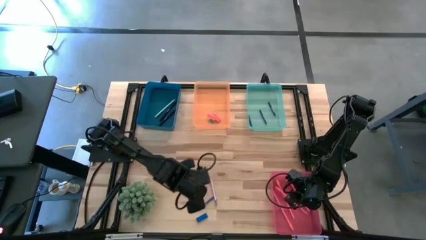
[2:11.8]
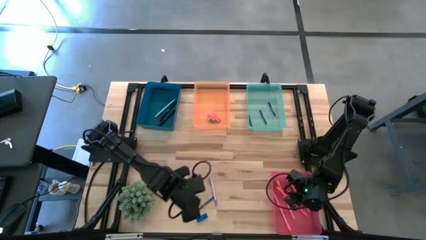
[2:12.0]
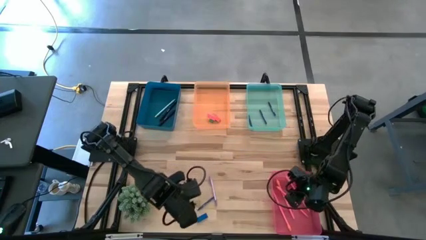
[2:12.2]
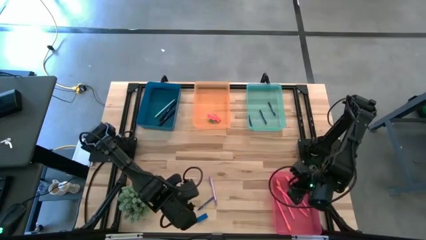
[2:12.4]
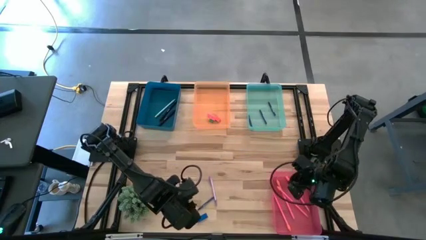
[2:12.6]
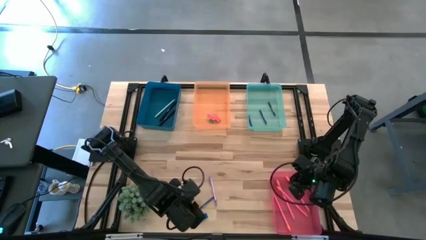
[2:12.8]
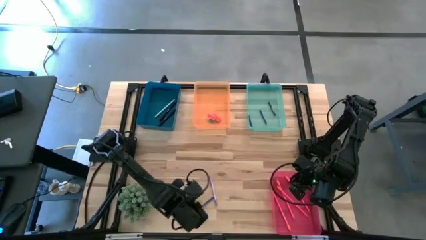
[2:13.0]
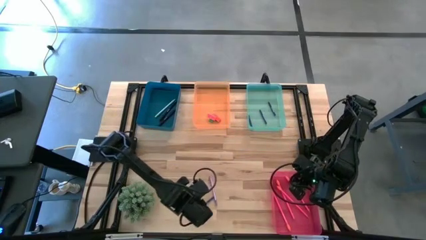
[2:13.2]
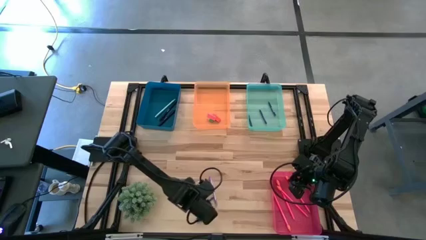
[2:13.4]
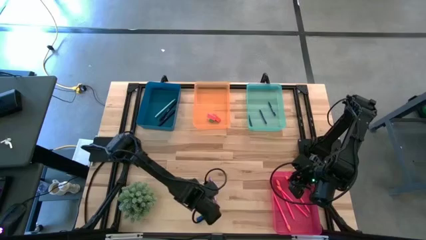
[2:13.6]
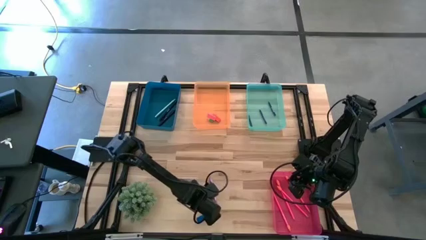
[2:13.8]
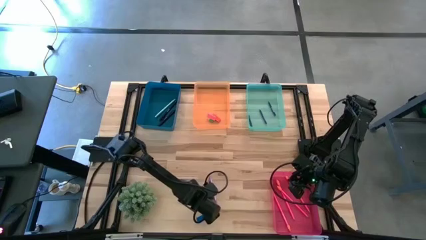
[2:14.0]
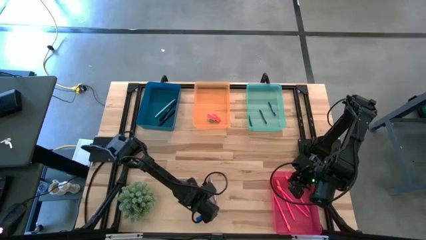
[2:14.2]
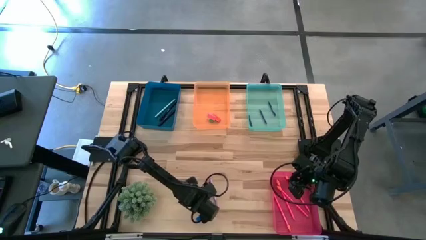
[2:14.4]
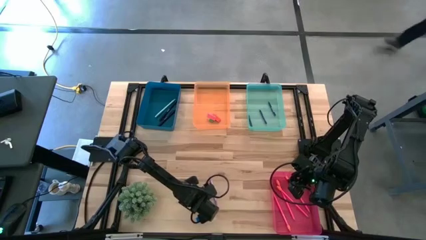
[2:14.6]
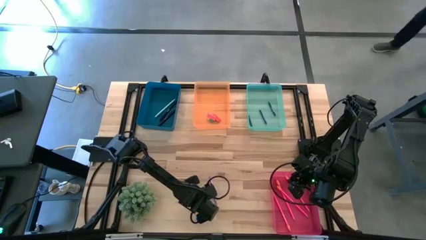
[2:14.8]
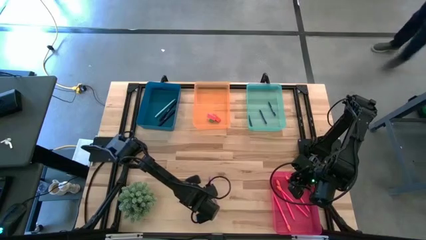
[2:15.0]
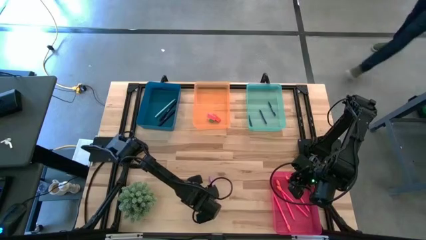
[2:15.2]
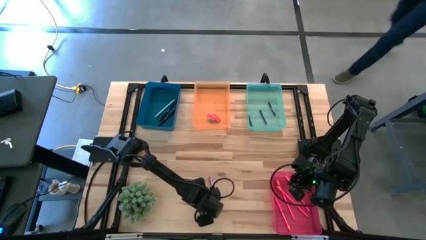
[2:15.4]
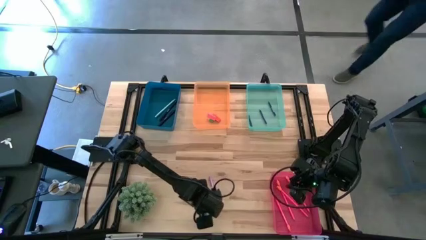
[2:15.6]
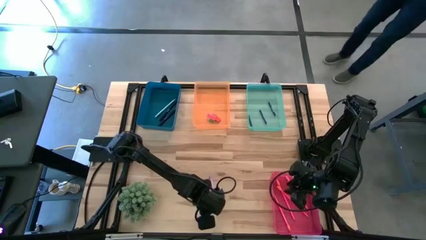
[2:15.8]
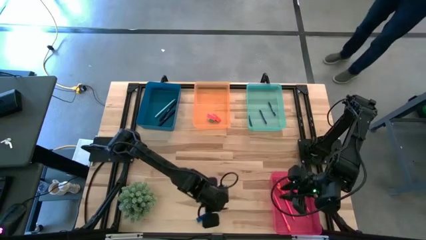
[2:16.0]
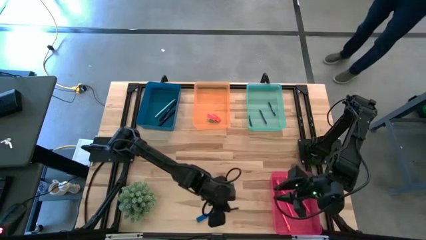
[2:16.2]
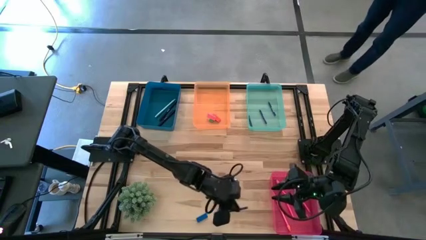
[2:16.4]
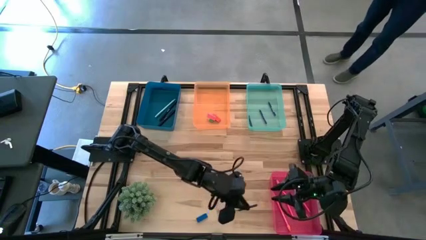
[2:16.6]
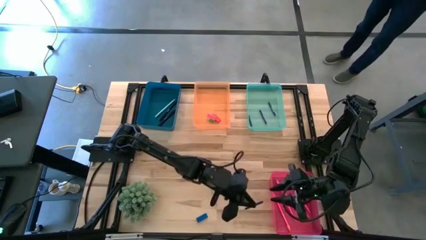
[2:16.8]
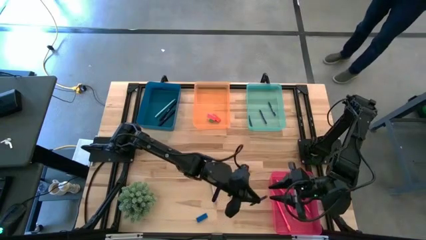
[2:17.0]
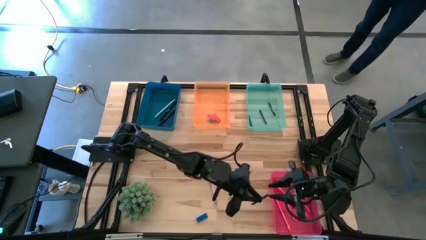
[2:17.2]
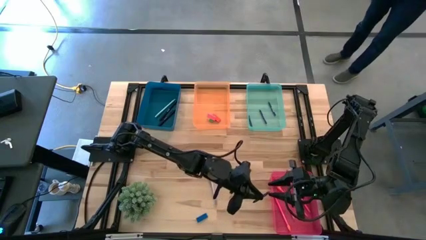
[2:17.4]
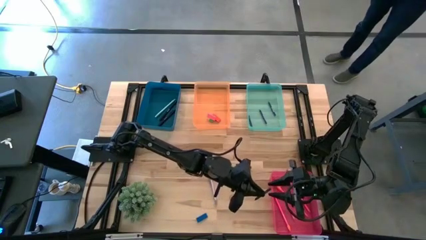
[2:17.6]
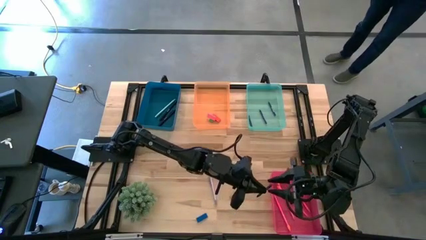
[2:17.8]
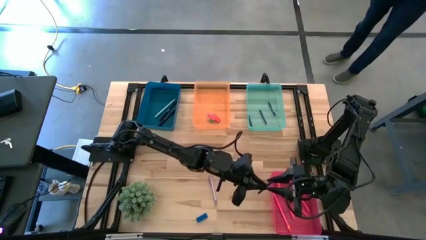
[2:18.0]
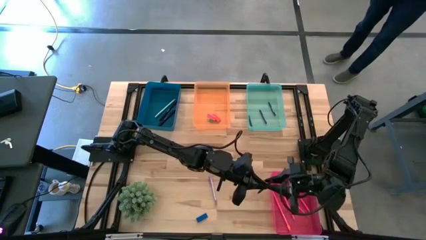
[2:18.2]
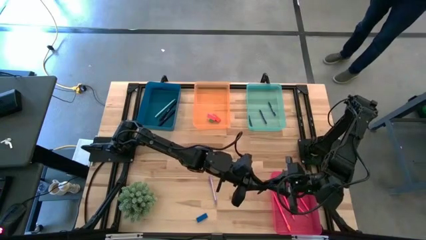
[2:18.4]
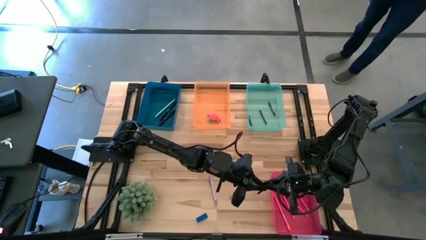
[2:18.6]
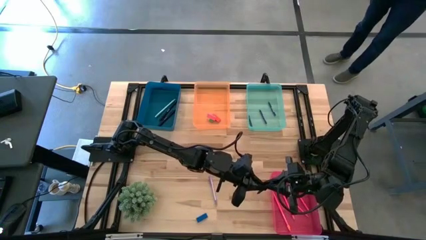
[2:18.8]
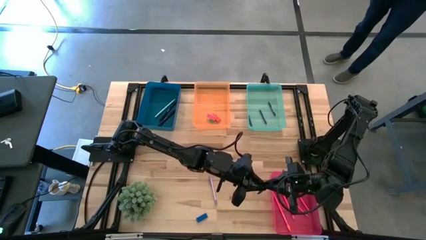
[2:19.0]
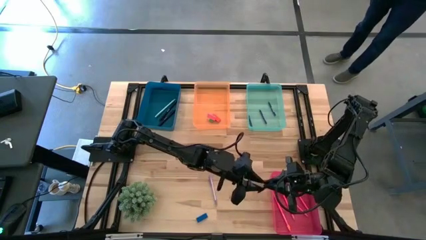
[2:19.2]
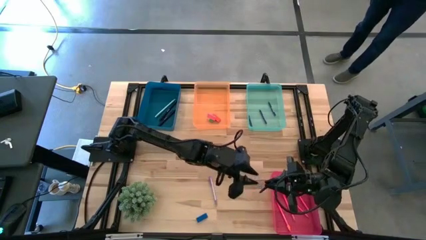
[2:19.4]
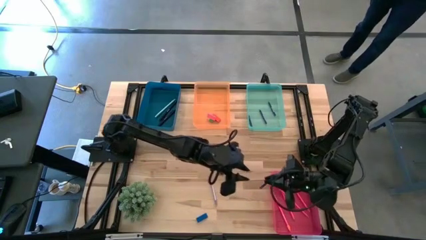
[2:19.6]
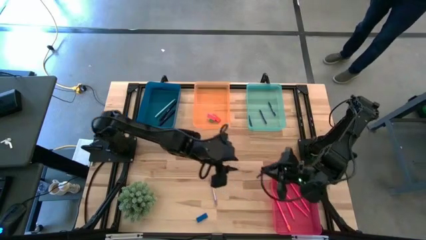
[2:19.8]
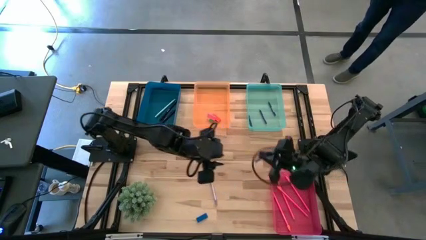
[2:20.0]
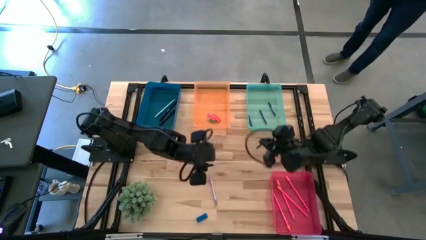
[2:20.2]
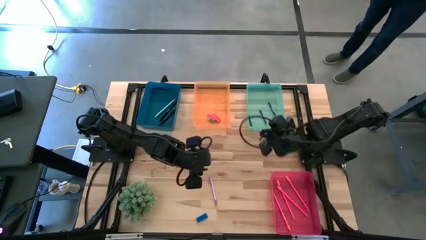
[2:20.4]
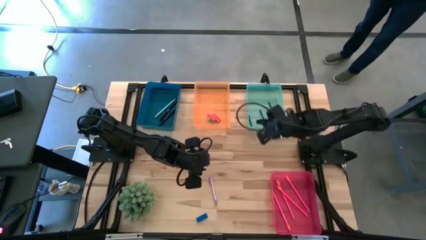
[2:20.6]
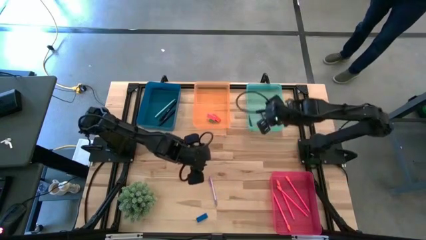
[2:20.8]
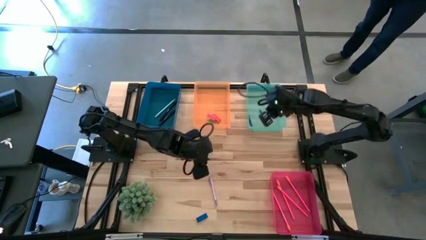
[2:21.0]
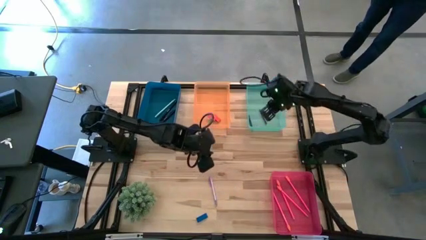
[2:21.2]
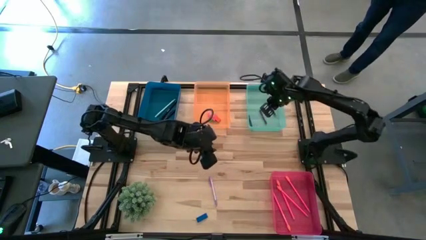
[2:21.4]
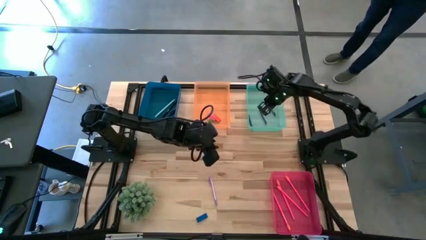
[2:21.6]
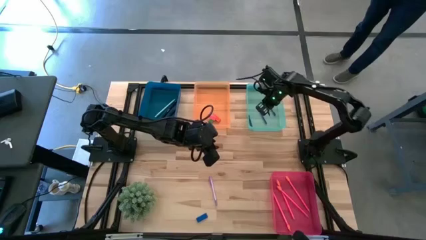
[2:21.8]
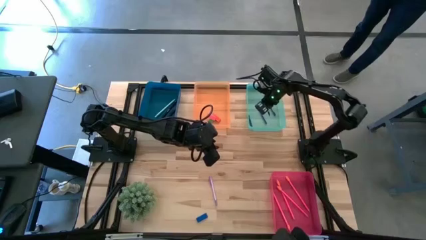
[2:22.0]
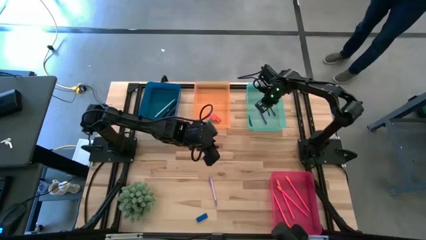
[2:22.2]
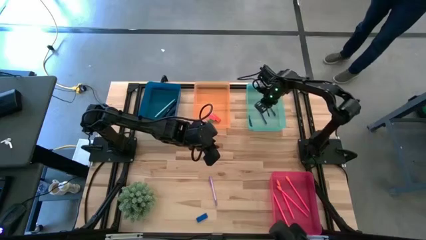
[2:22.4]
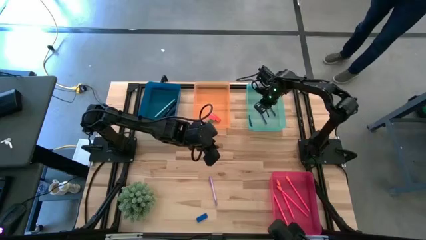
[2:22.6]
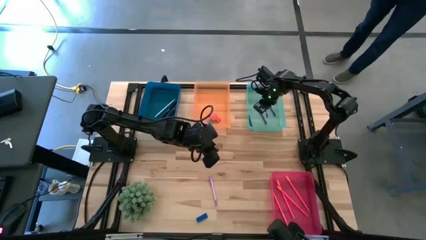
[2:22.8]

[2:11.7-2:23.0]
Task: Sort crayons/erasers/pens/pencils in bins
Put the blue crayon into the green bin
